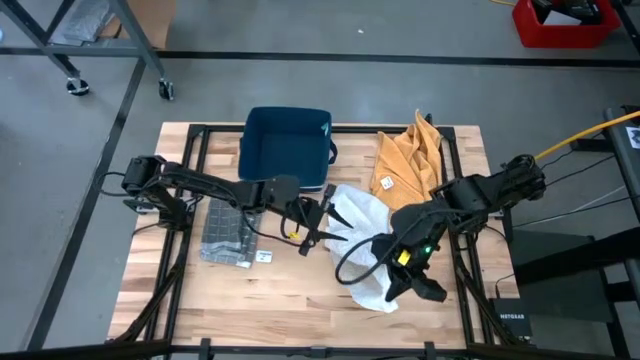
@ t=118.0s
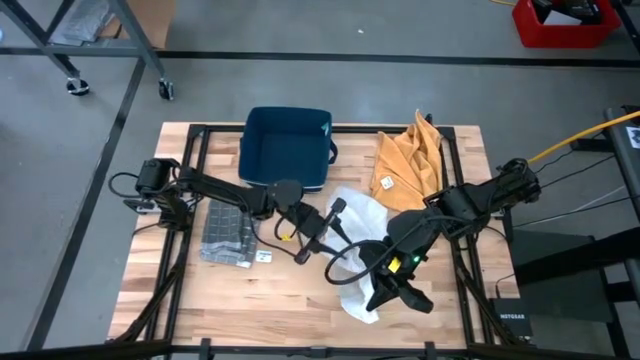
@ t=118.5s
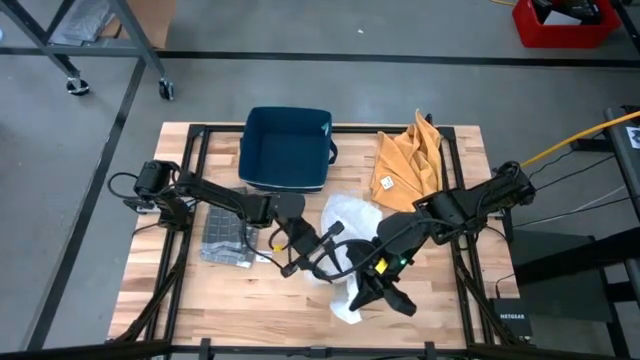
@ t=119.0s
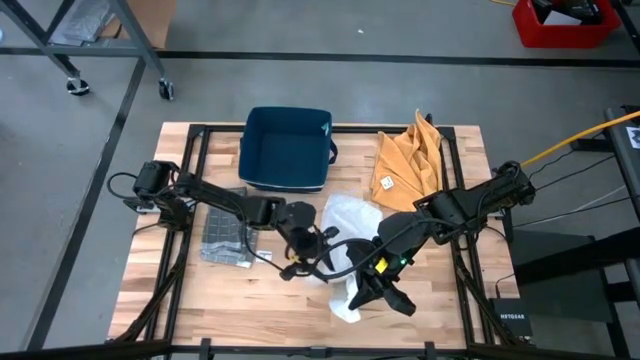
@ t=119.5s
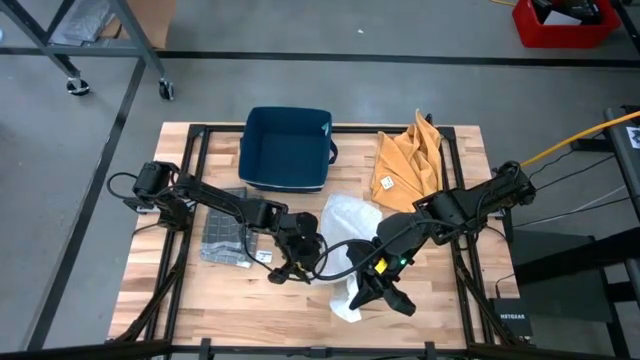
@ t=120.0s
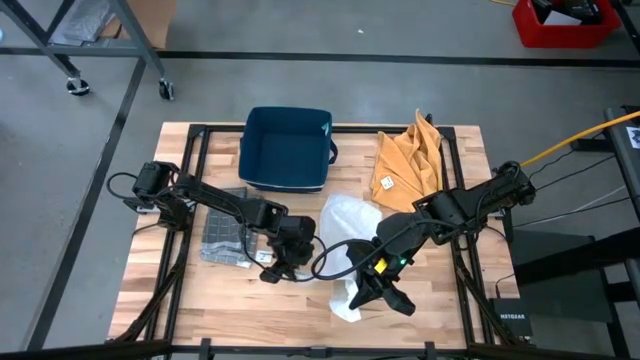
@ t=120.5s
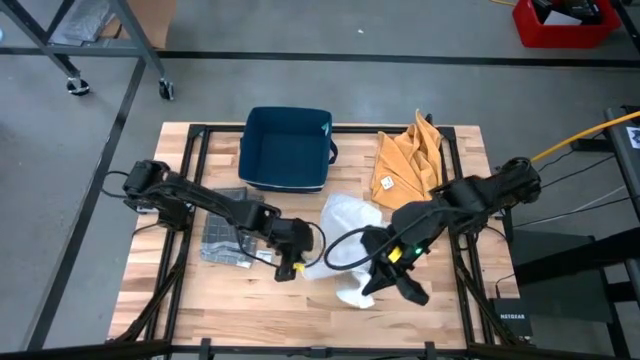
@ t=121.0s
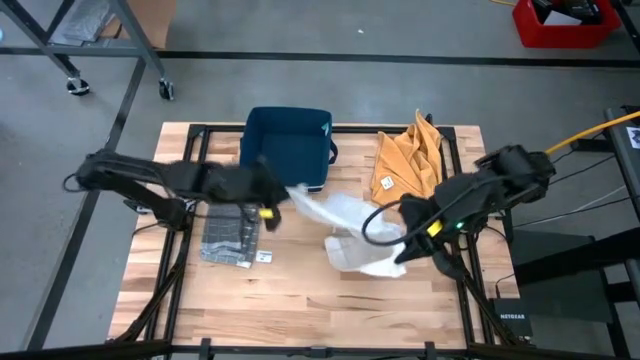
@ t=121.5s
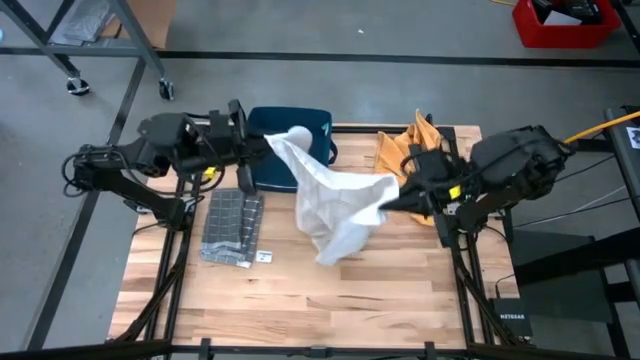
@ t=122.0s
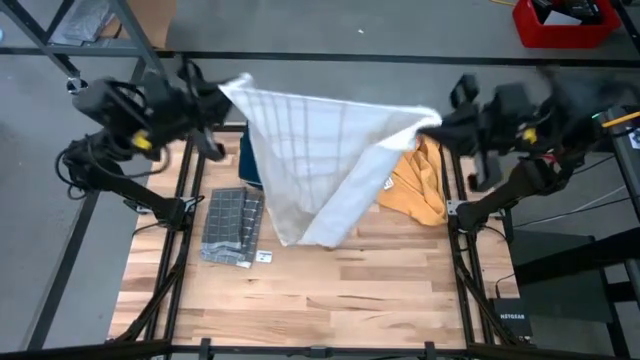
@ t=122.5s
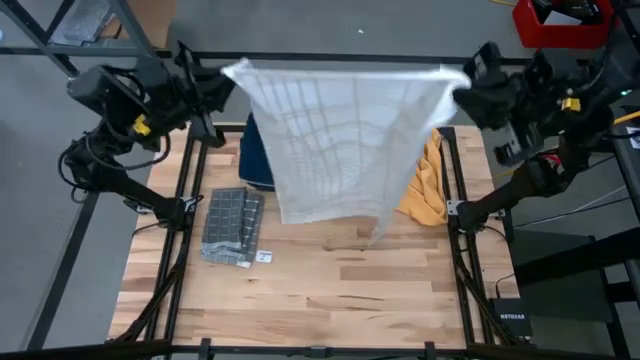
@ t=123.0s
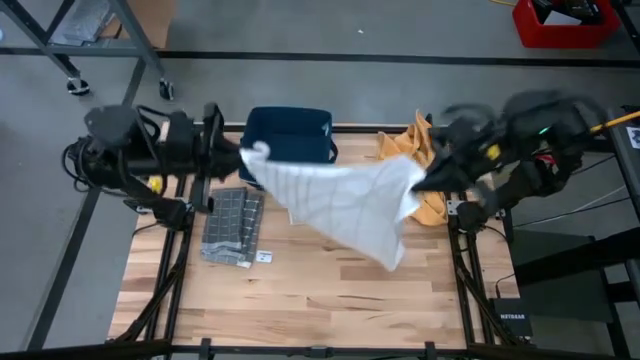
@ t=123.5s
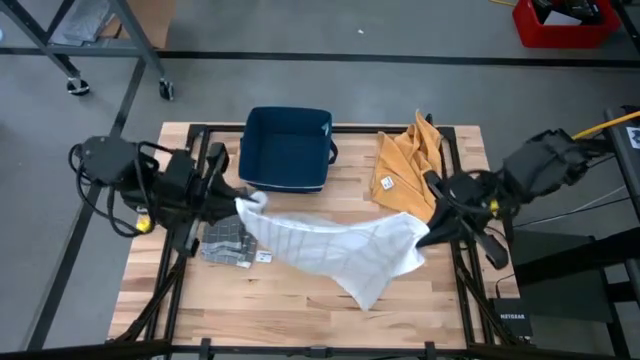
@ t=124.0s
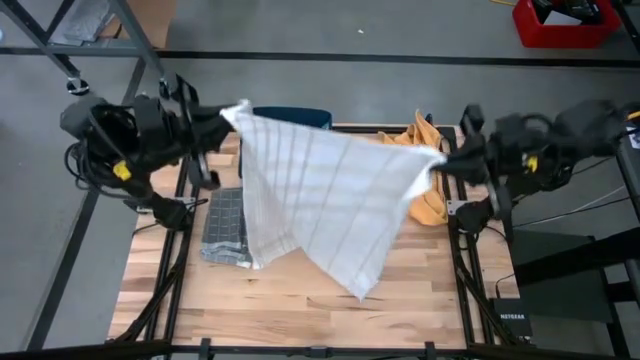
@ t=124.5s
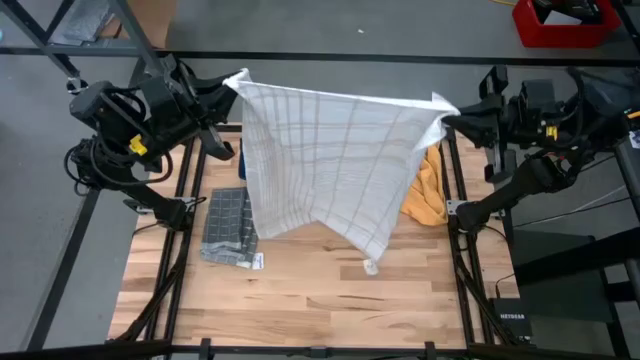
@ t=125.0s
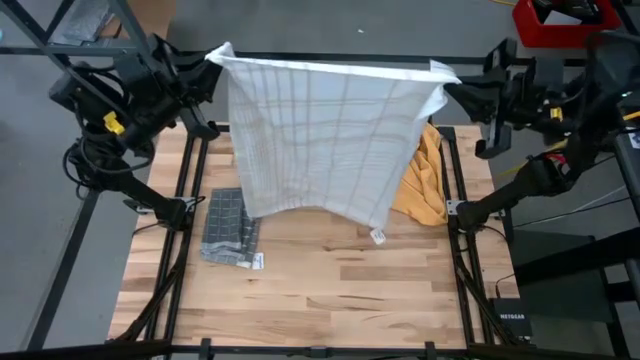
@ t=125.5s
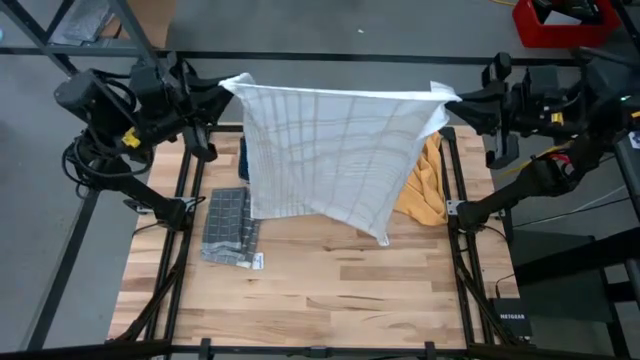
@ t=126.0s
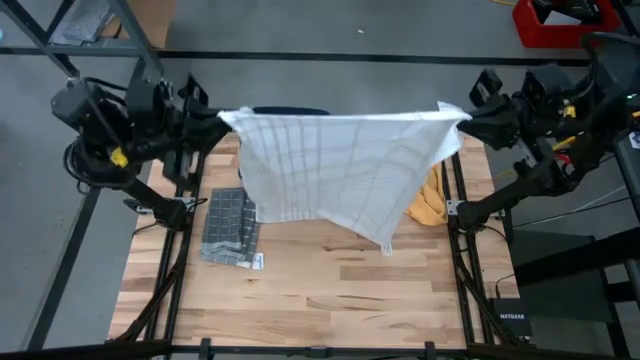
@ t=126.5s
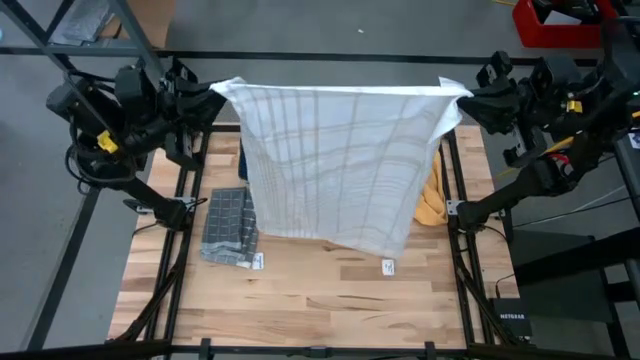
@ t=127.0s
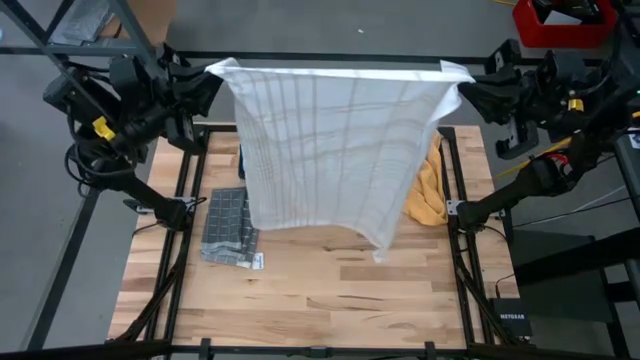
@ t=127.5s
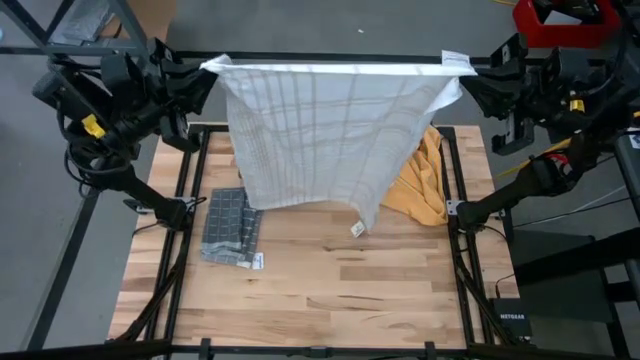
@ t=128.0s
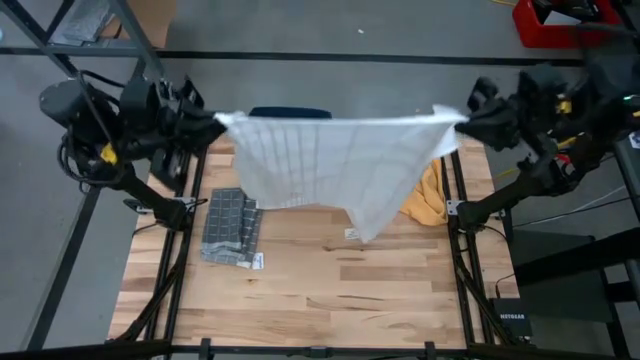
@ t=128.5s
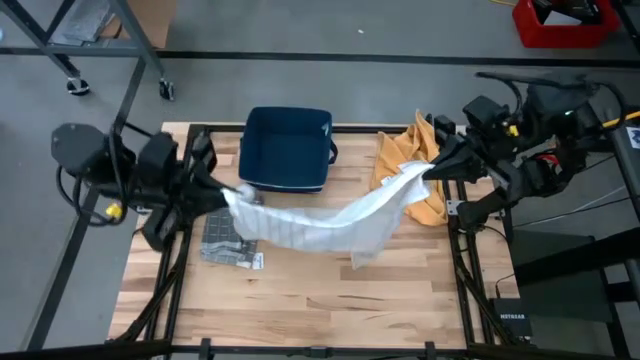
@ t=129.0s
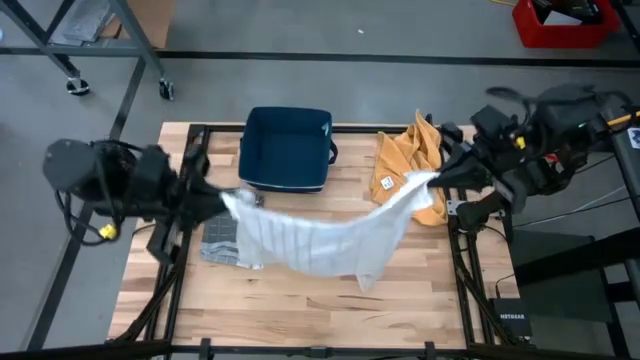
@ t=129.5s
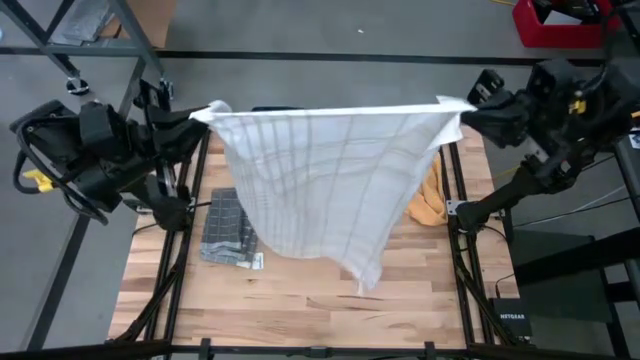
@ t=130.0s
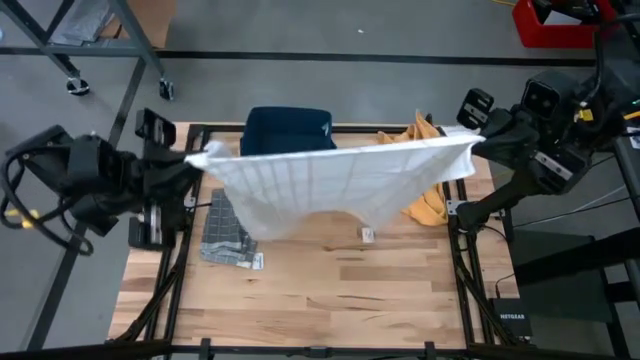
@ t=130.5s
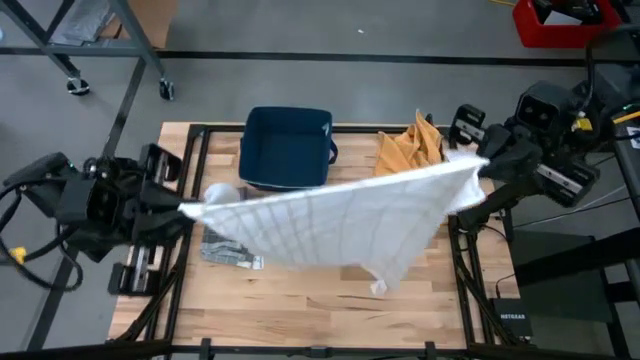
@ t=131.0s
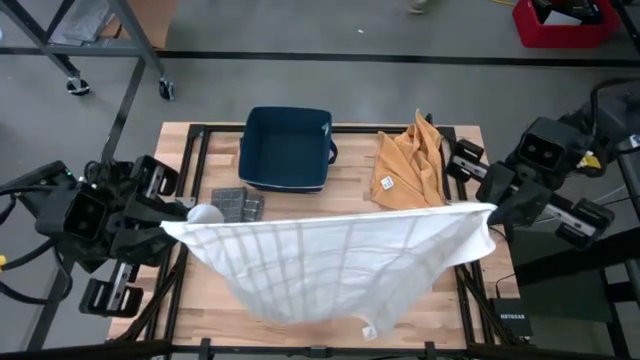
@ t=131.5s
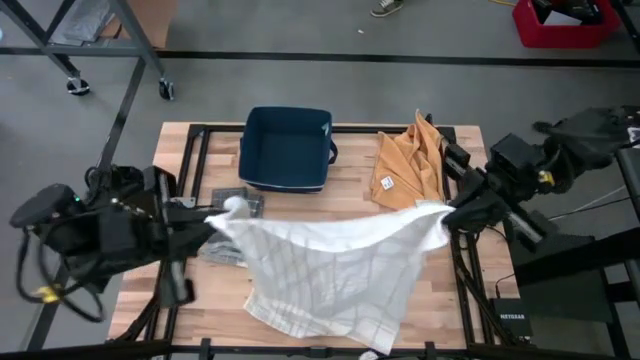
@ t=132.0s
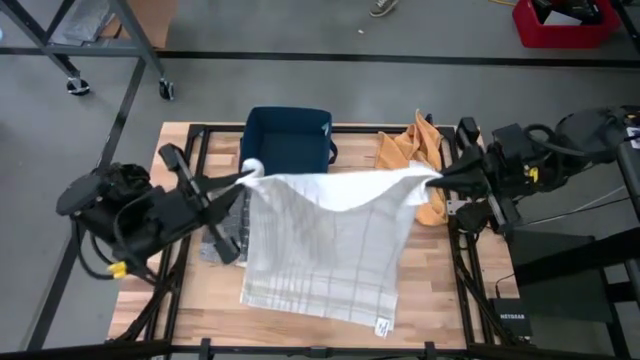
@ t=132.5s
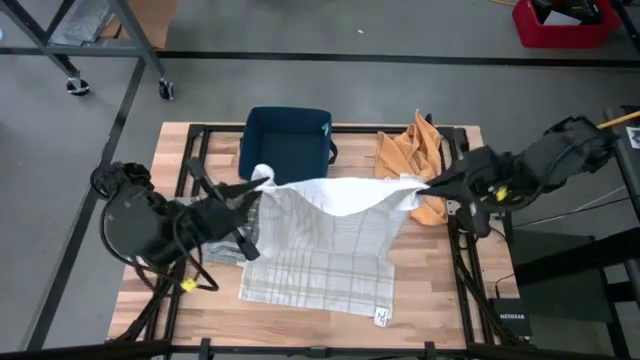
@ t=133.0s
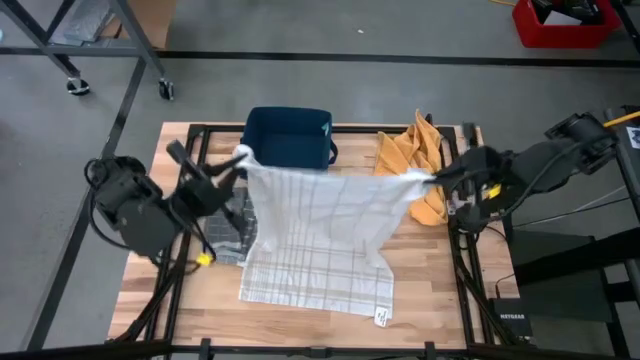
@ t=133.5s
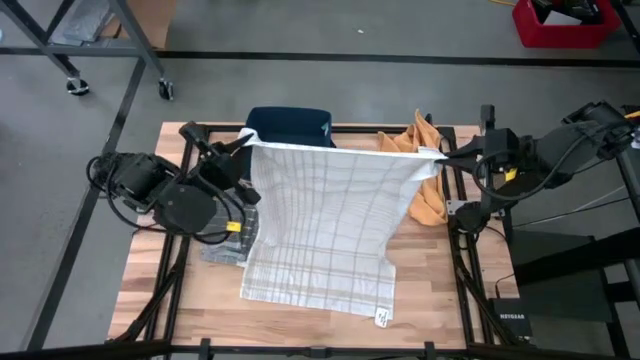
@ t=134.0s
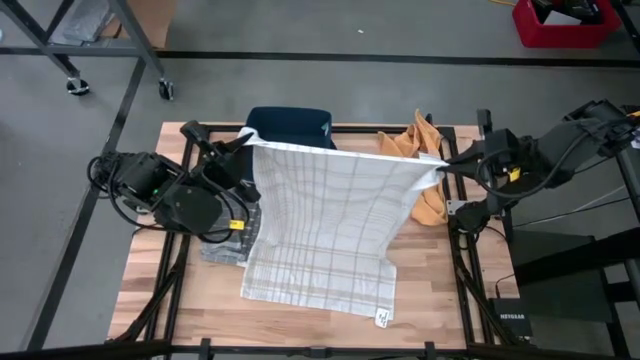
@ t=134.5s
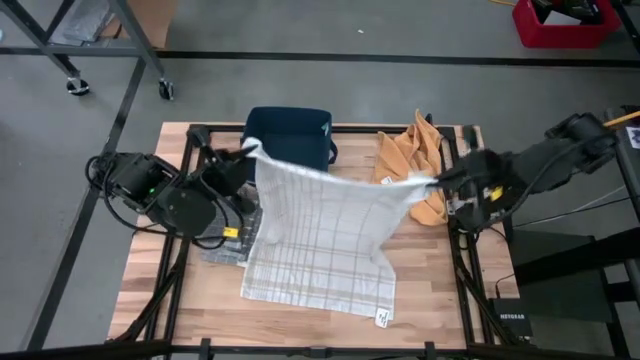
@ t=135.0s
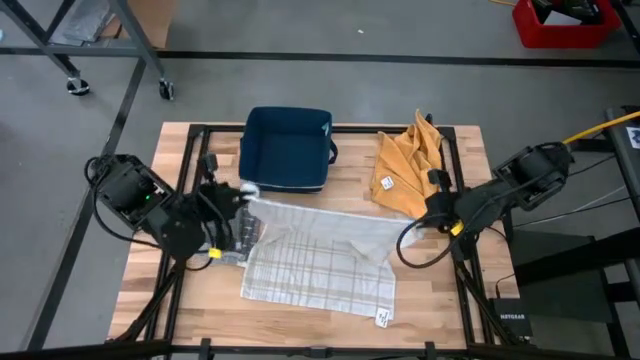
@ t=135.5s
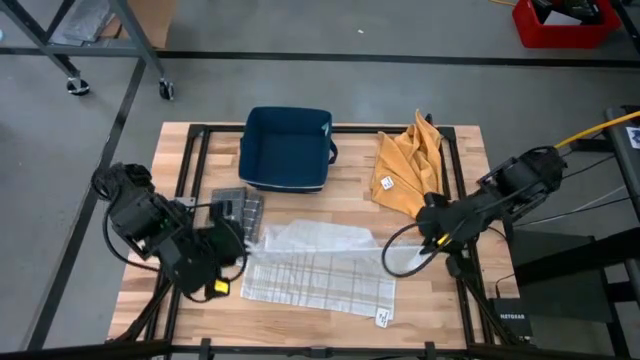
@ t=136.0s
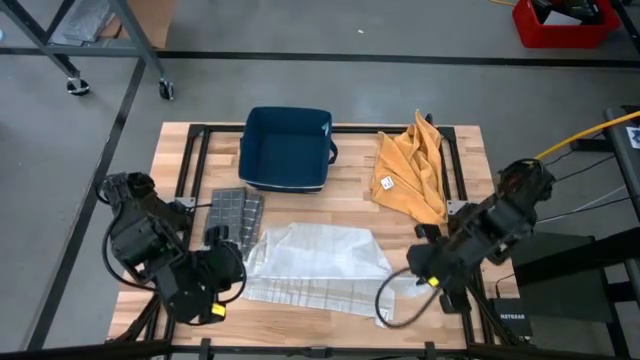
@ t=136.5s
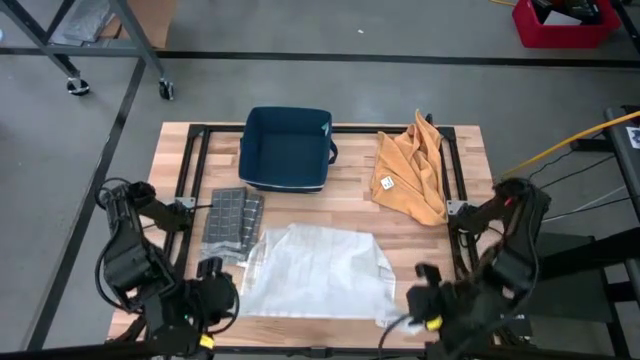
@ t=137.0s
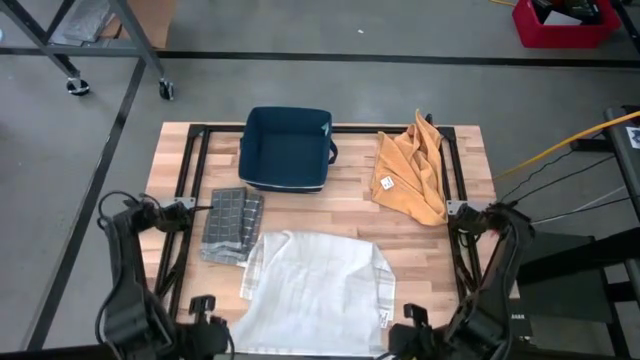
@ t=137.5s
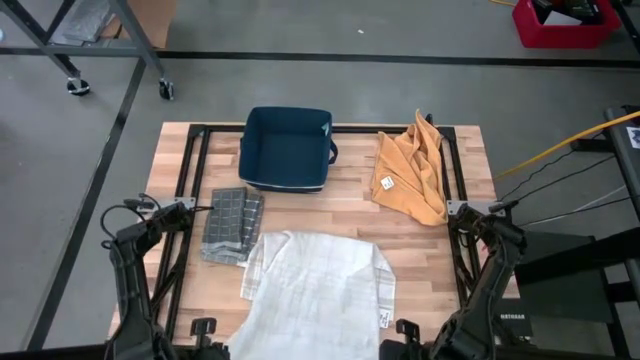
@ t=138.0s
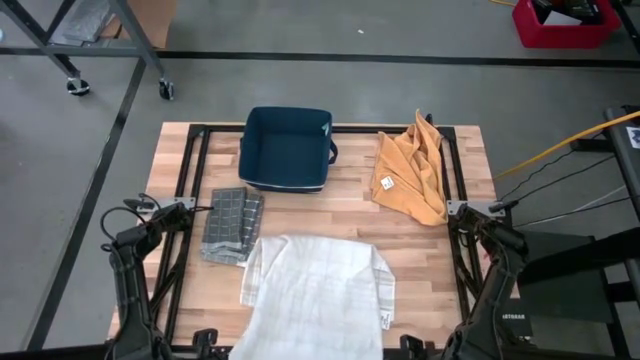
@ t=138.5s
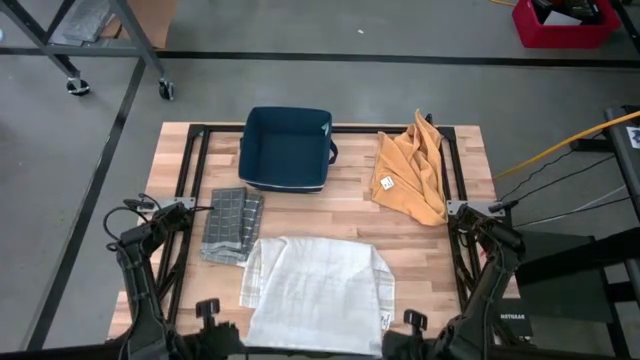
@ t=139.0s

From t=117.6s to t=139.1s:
Task: Fold towel
Fold the white patterned towel
